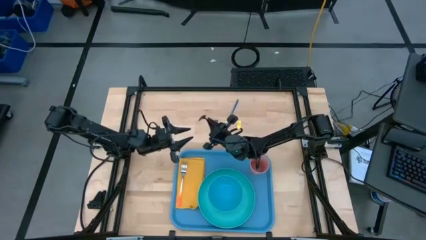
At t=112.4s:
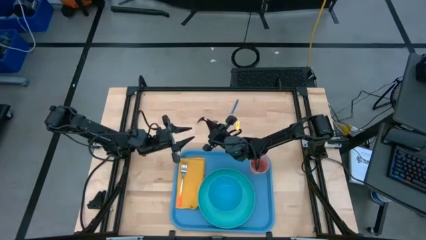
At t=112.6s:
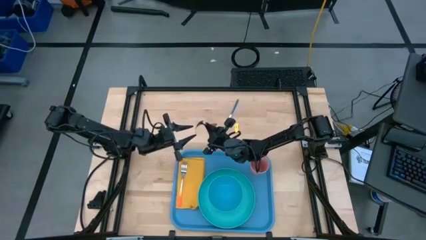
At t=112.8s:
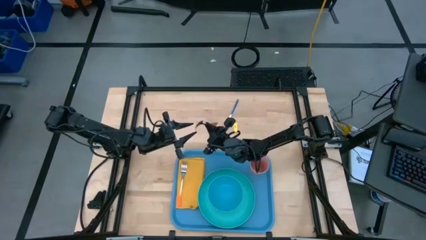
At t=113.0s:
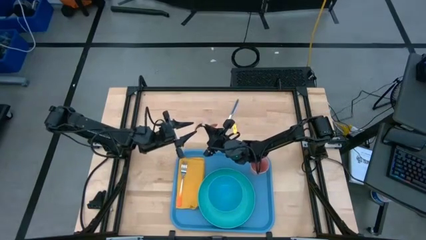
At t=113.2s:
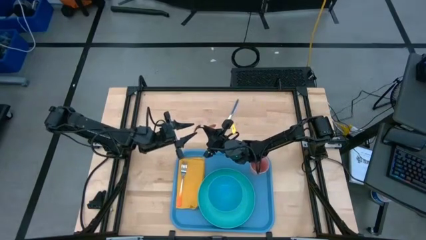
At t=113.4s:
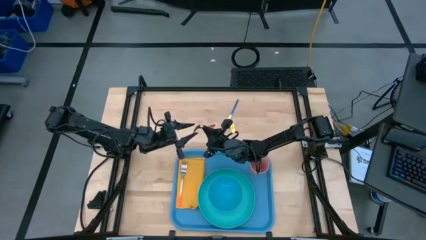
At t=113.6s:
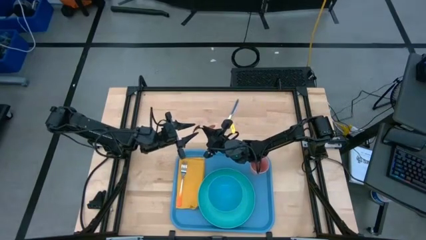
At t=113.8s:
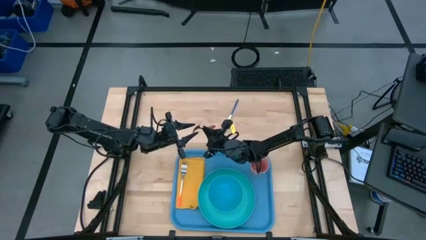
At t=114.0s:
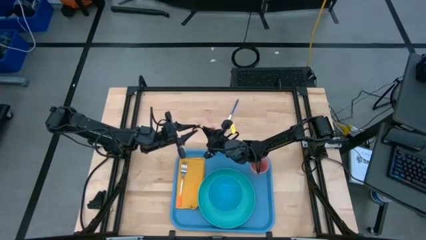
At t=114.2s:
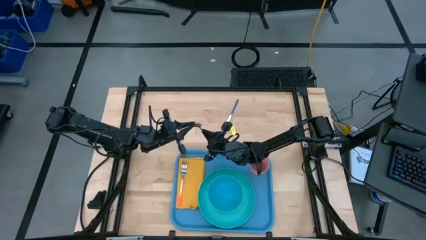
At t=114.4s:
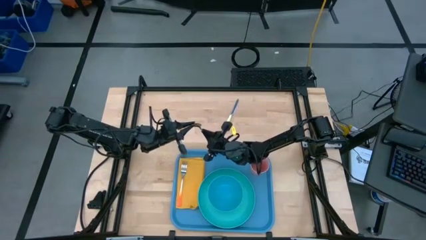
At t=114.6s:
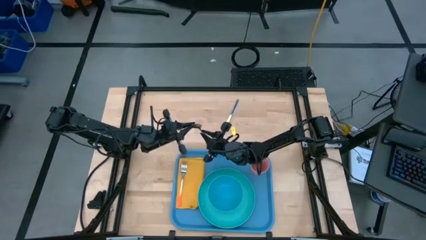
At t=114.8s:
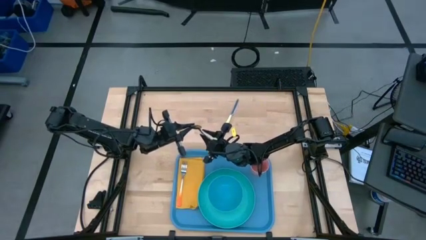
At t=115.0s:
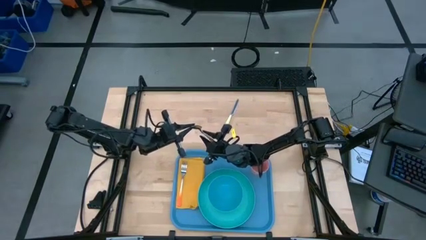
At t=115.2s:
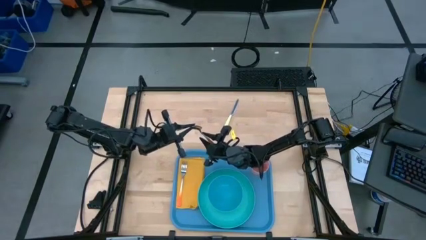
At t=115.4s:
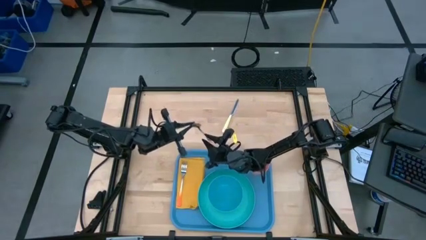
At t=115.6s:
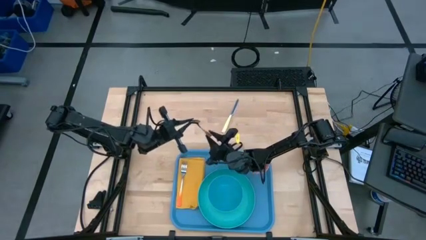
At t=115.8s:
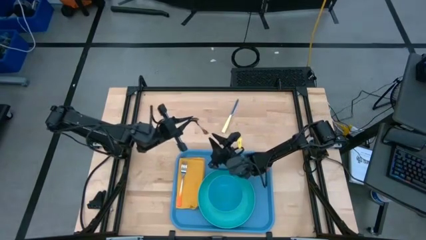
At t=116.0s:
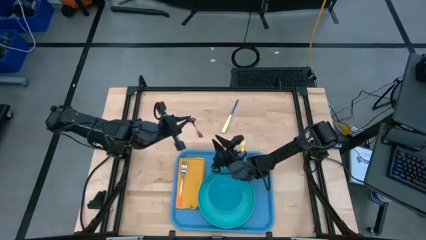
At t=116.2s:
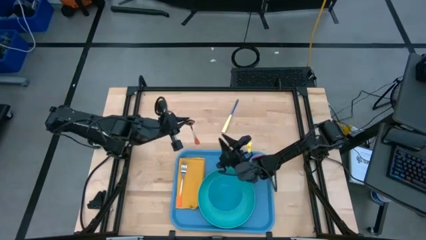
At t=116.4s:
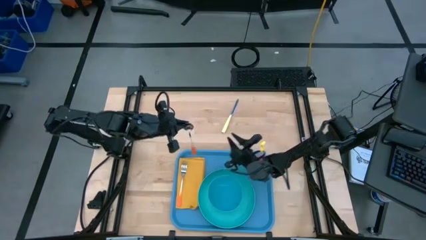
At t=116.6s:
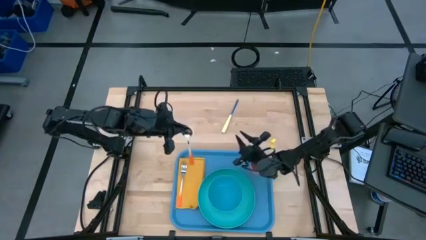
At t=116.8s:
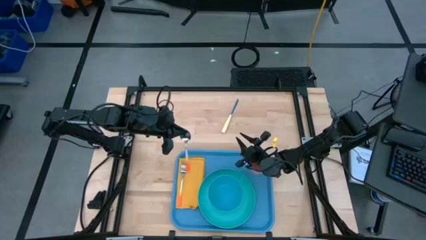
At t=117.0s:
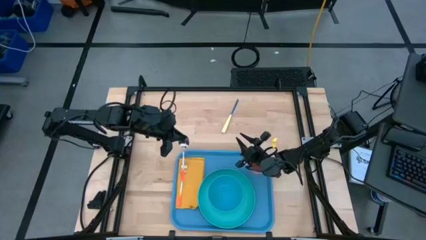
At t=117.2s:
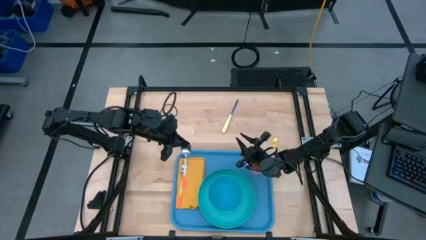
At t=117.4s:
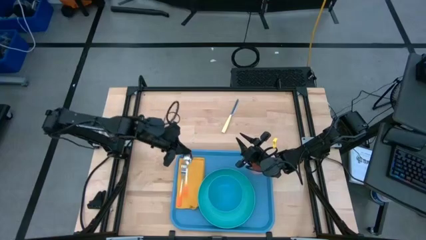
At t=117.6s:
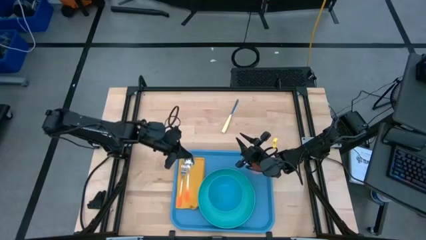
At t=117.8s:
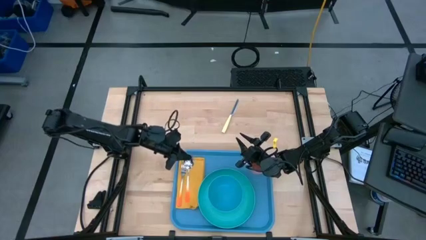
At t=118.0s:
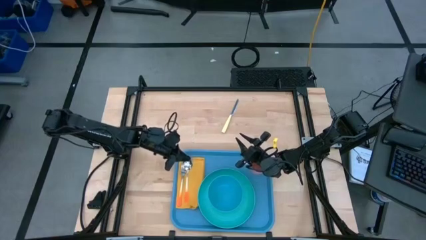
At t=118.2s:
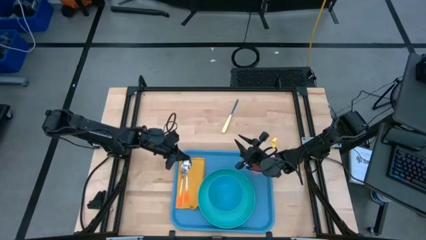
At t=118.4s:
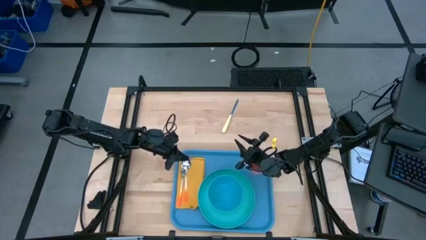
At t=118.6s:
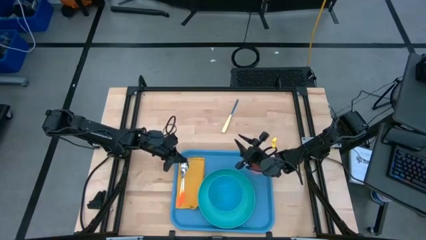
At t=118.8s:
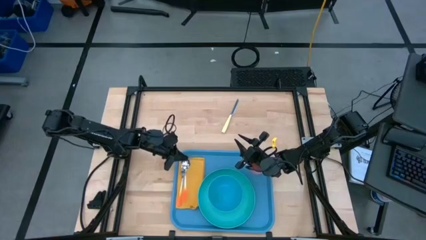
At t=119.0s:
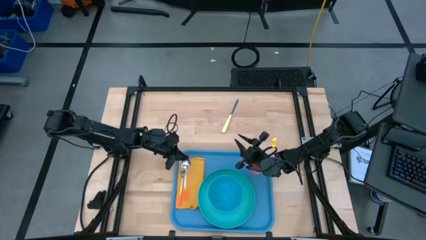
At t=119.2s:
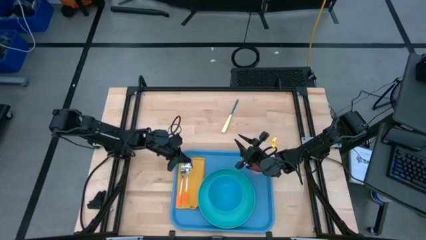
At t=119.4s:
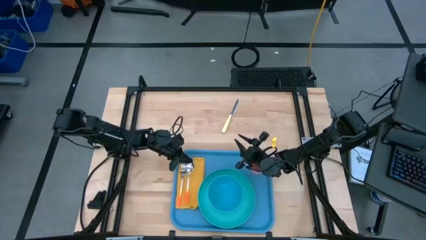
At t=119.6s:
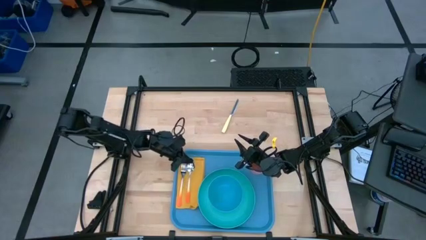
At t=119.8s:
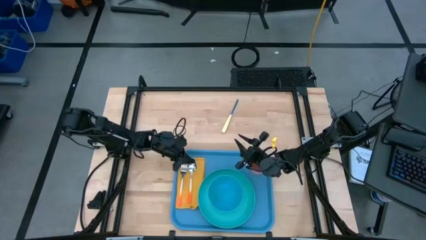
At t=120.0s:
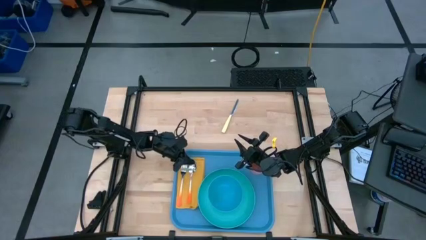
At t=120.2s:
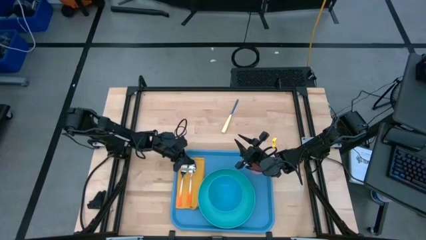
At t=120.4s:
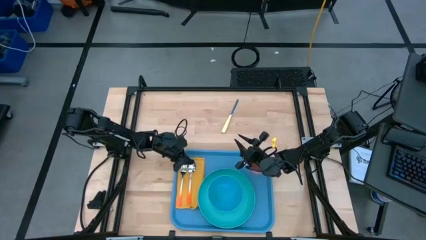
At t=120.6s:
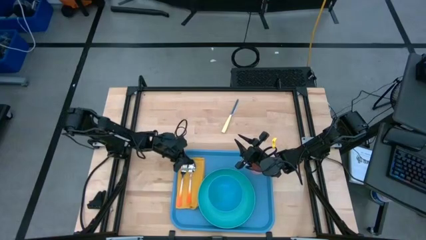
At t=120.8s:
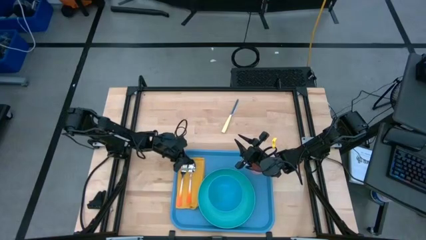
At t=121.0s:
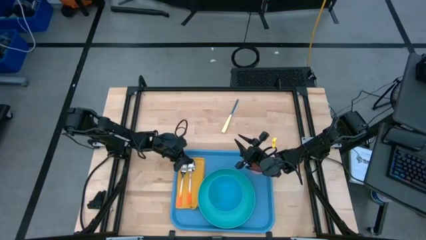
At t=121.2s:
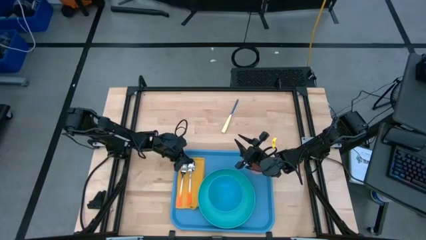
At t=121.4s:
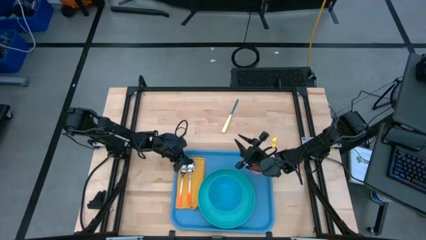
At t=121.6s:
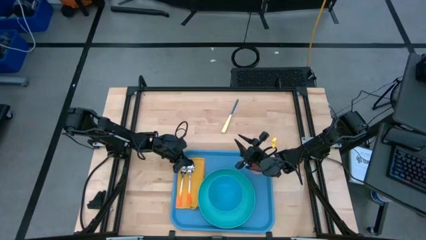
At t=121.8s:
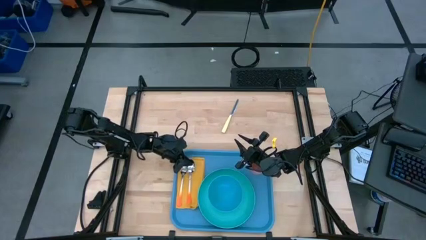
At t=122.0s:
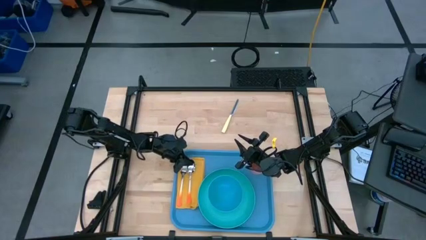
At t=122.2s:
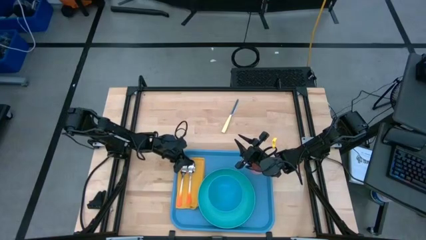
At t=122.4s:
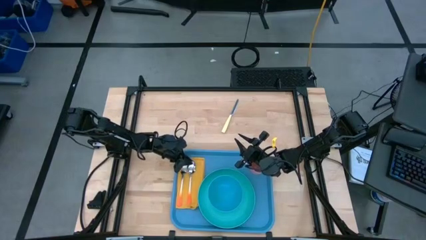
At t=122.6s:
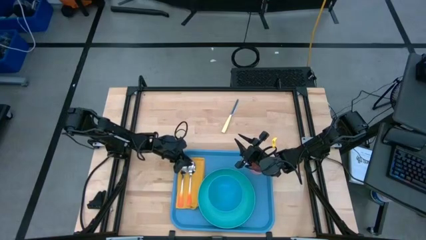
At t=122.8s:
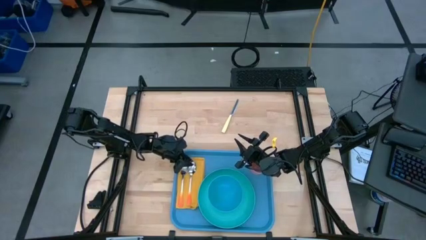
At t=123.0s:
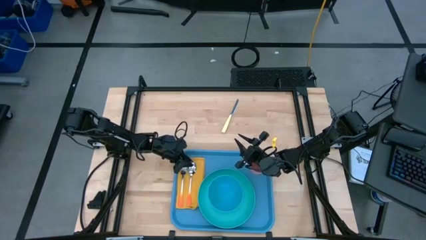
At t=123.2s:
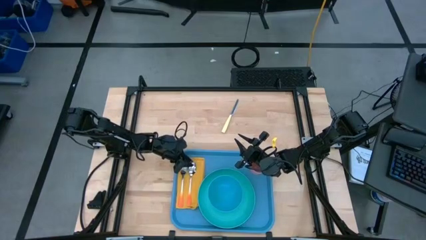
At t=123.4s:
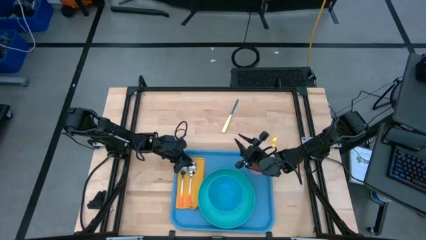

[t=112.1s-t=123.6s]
Task: Set up tray
Put the orange spoon to the right of the orange fork on the orange napkin on the blue serving tray

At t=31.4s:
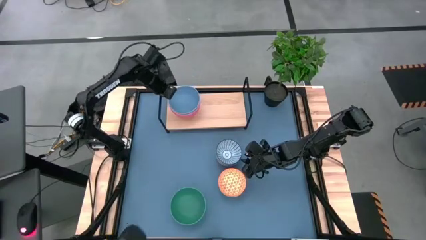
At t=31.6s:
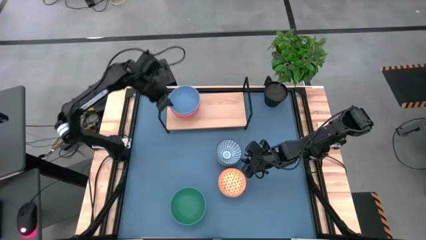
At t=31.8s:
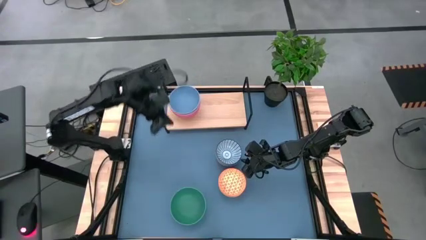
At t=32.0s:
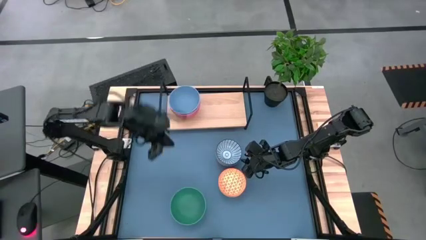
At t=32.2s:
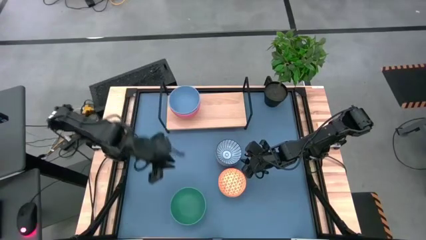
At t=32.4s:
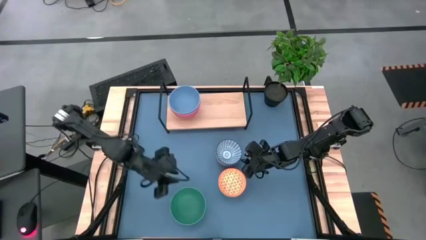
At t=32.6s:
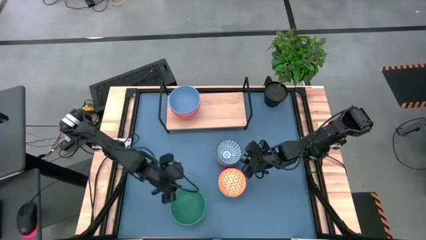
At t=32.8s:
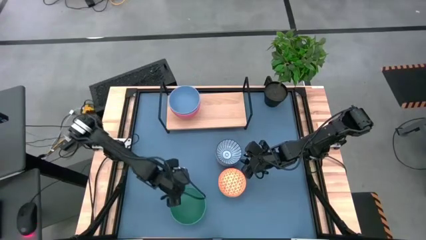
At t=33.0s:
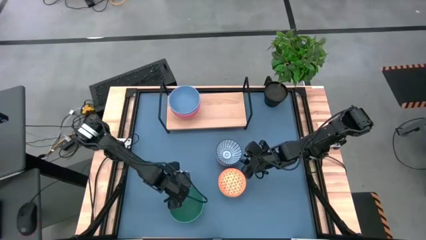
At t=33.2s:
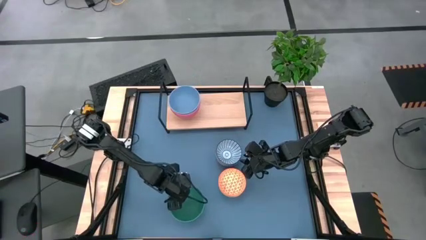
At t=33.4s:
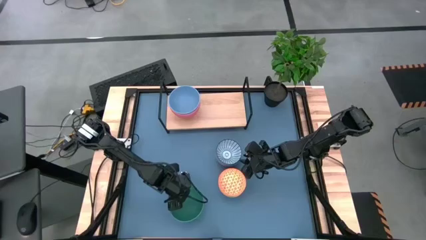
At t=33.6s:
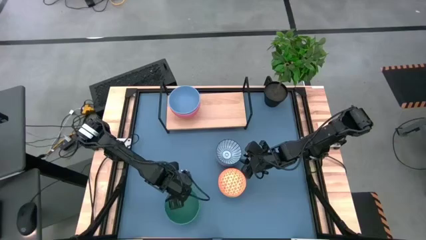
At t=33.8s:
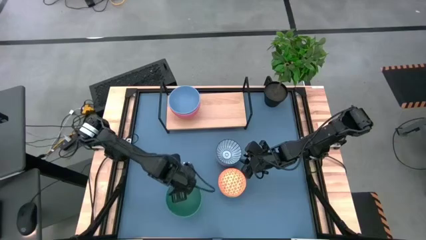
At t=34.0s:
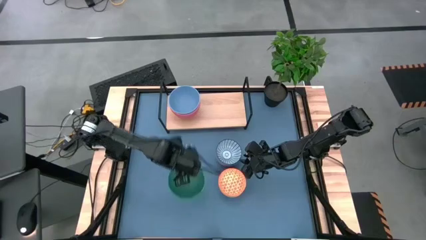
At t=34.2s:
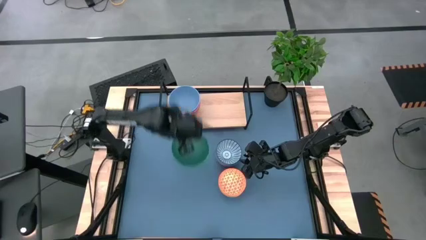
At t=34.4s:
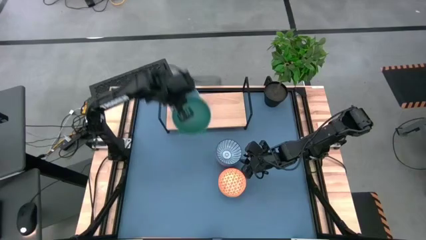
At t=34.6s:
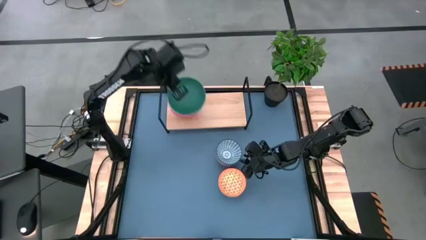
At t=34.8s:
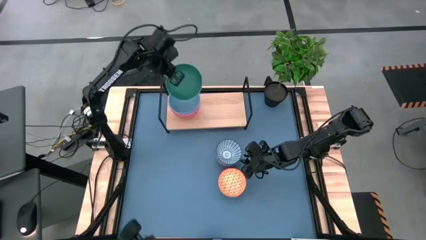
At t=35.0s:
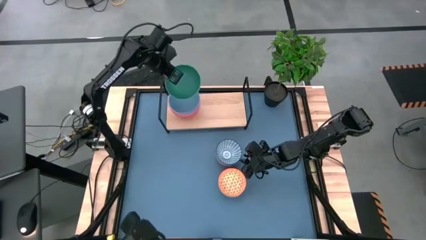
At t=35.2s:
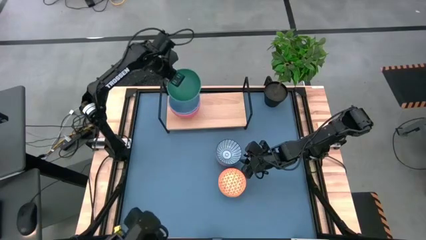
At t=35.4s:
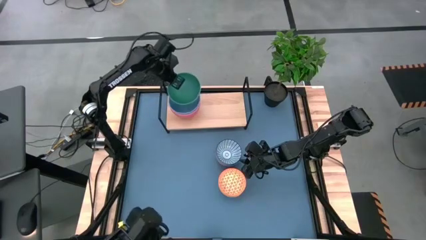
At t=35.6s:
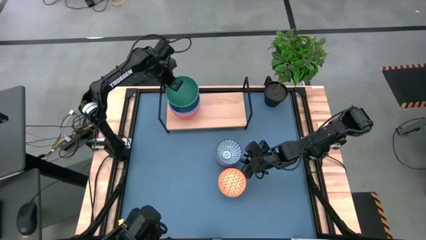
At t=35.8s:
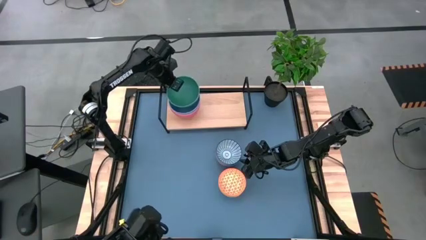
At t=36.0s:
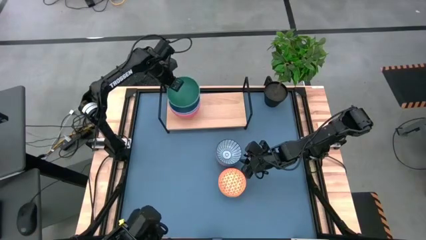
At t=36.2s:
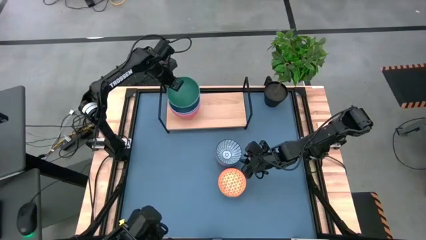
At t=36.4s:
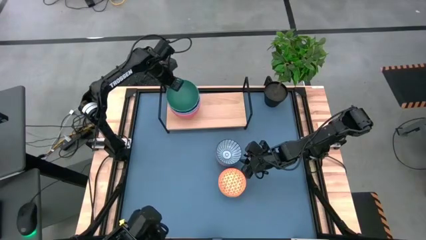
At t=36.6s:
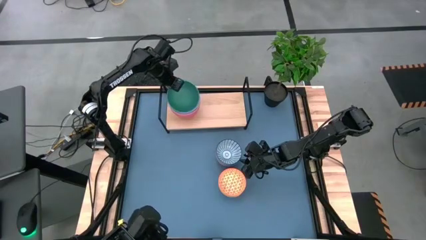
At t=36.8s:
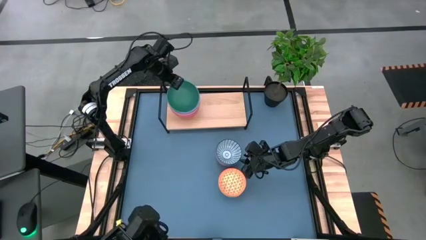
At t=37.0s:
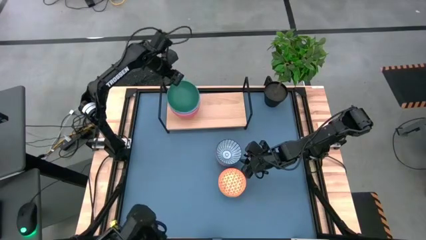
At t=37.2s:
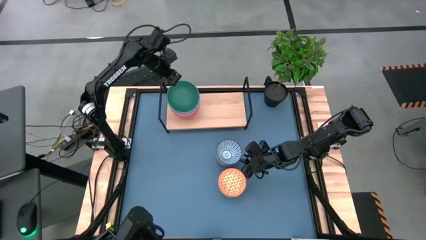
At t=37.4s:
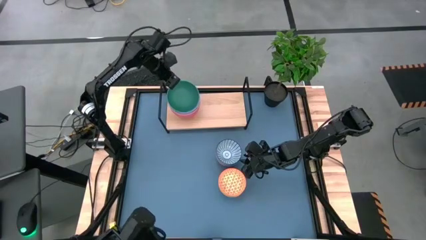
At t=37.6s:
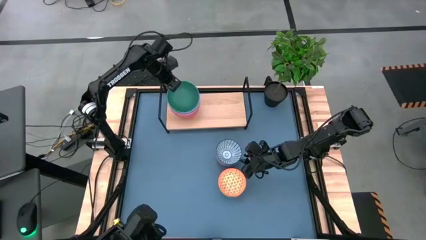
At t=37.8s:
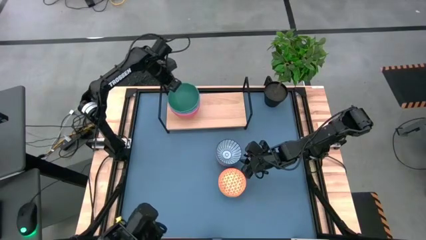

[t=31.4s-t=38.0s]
Task: Place and stack bowls onto a shelf
Stack the green bowl on top of the blue bowl on the shelf
